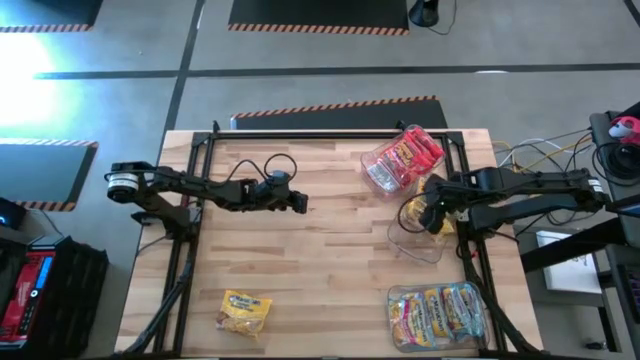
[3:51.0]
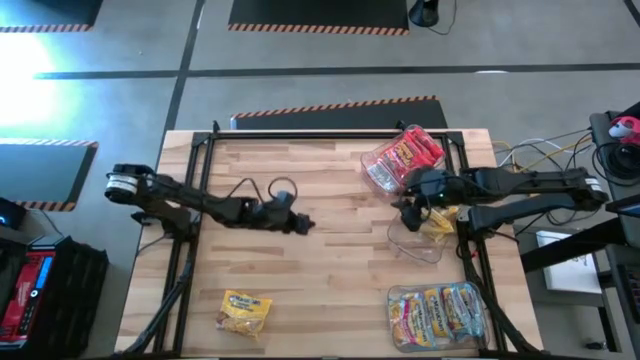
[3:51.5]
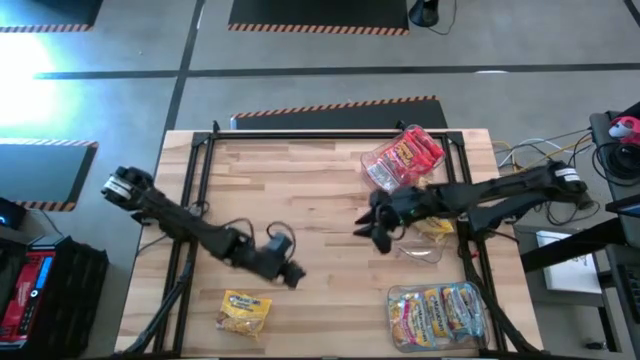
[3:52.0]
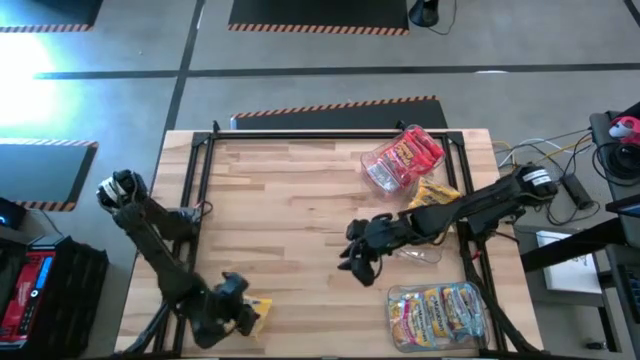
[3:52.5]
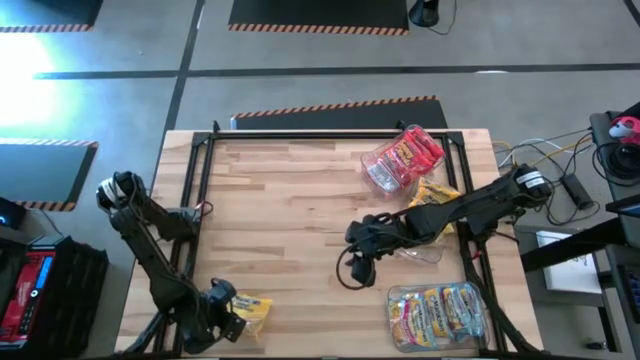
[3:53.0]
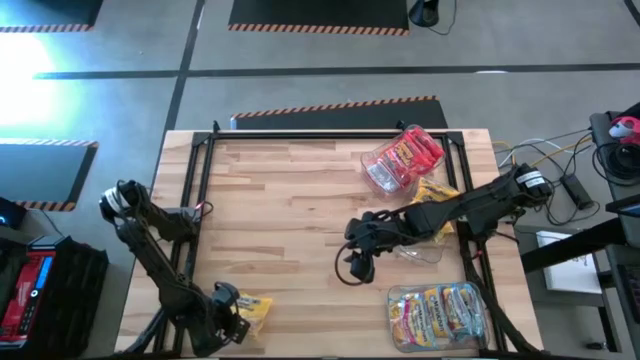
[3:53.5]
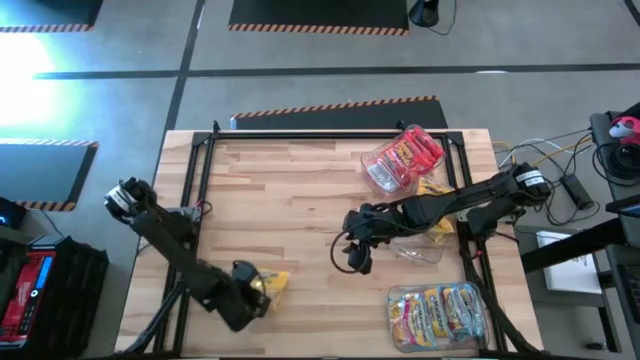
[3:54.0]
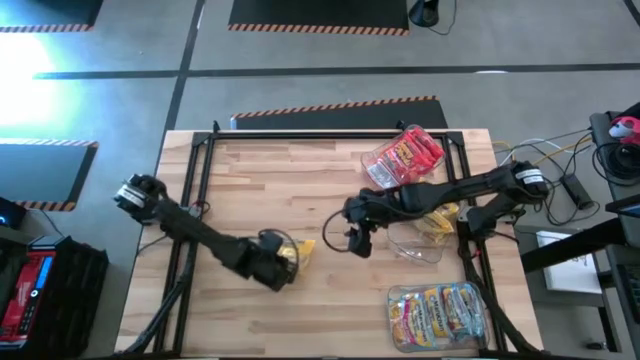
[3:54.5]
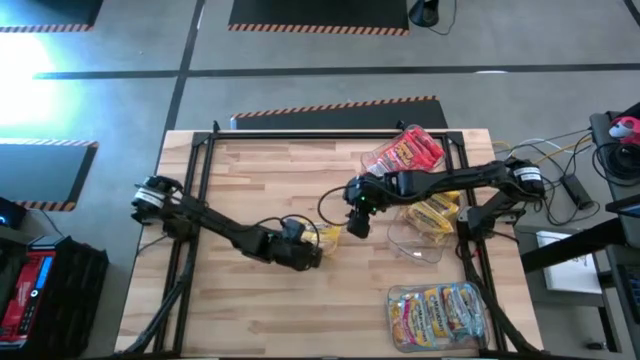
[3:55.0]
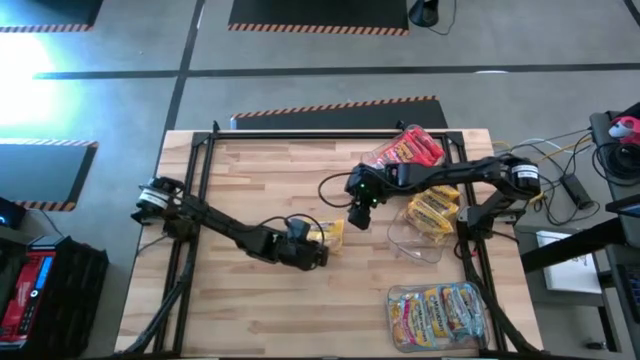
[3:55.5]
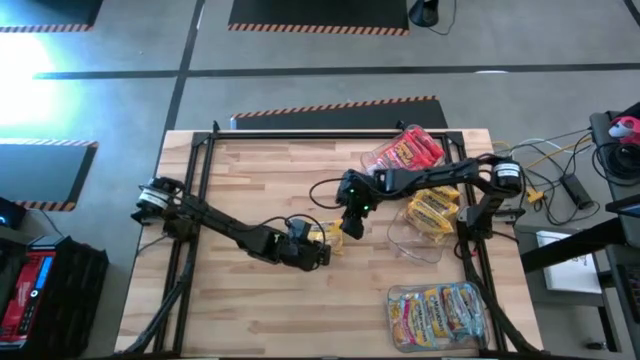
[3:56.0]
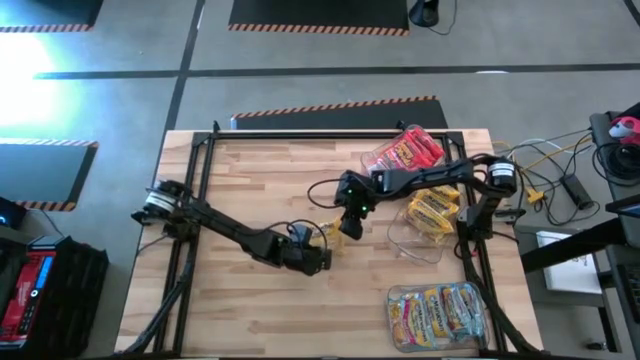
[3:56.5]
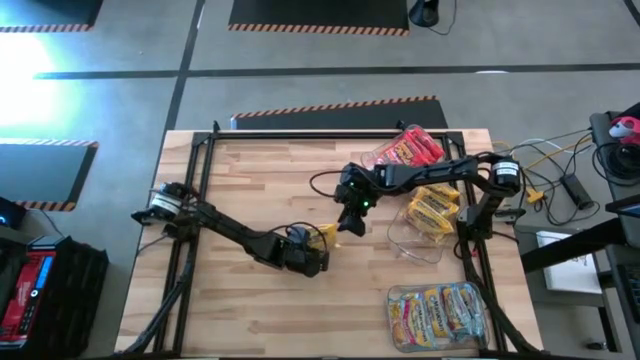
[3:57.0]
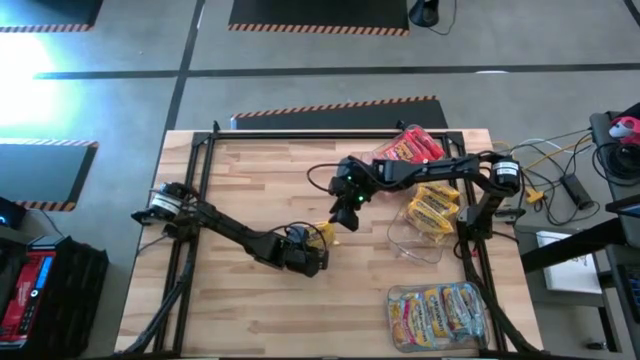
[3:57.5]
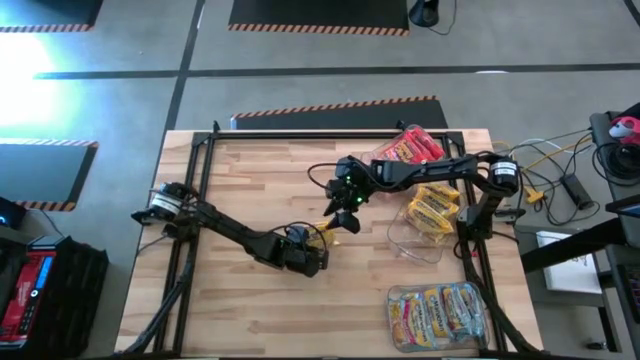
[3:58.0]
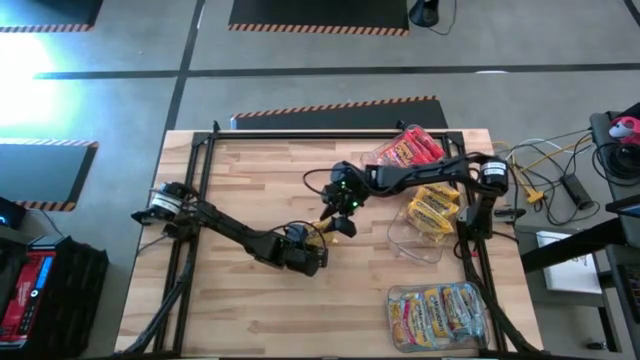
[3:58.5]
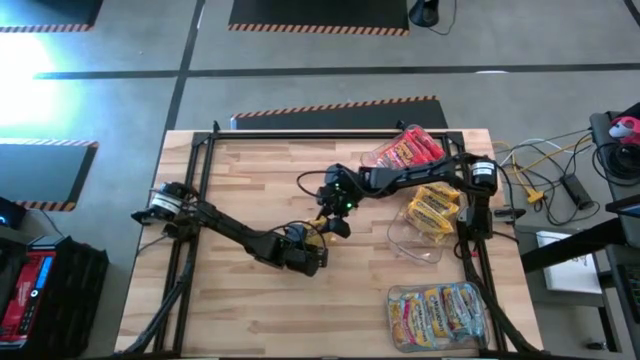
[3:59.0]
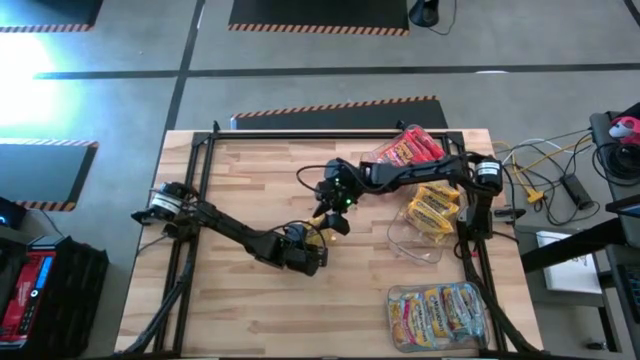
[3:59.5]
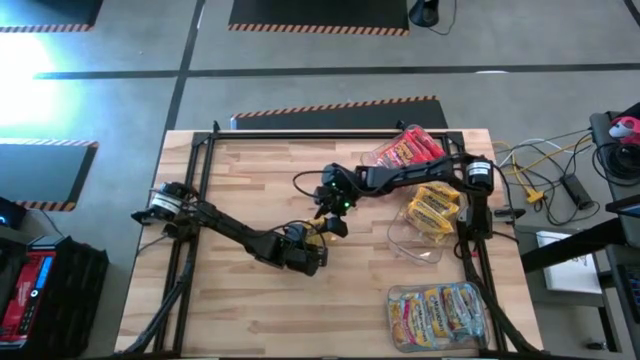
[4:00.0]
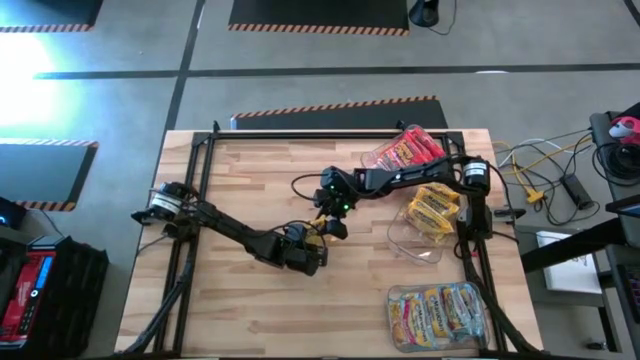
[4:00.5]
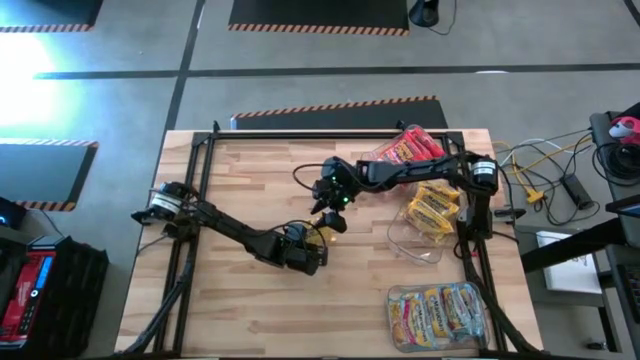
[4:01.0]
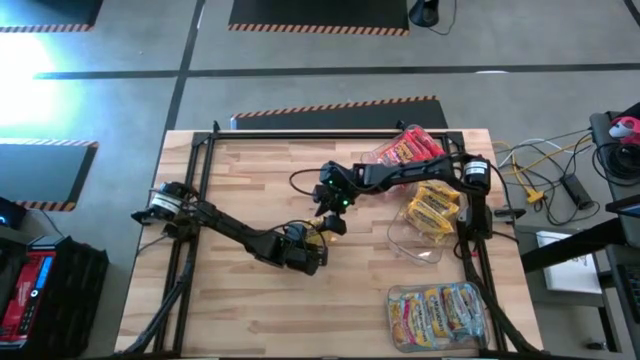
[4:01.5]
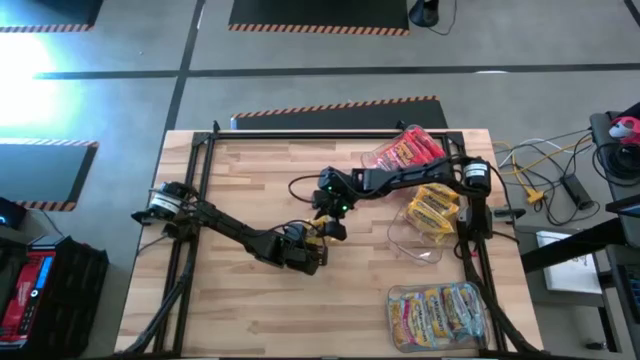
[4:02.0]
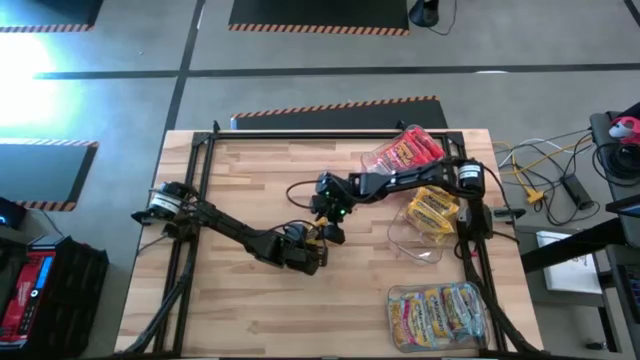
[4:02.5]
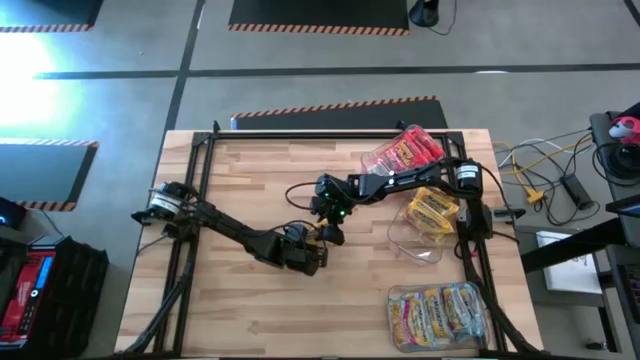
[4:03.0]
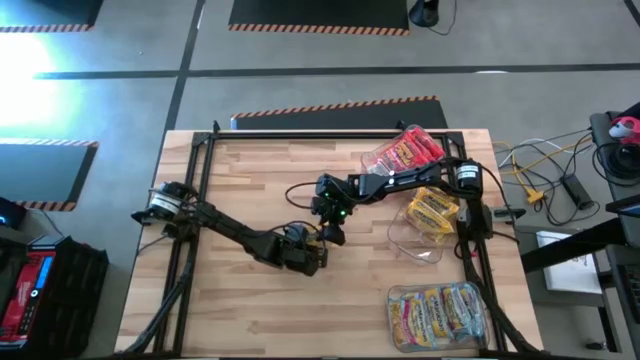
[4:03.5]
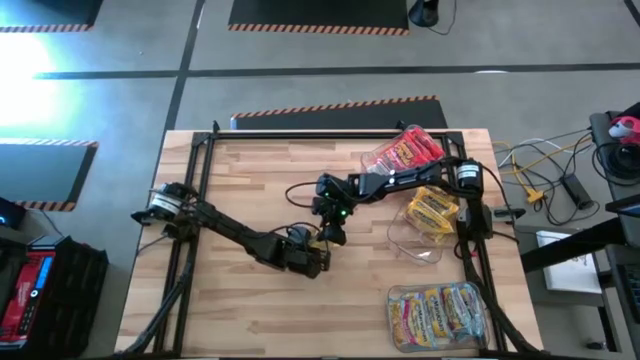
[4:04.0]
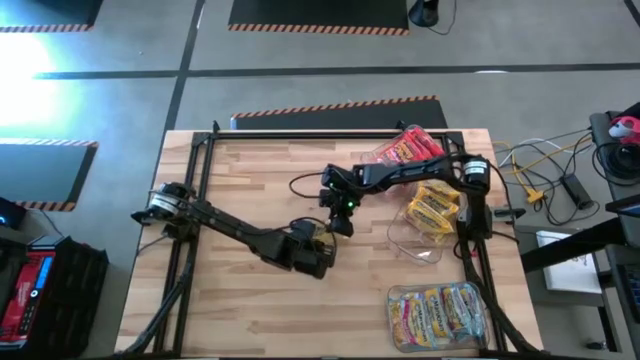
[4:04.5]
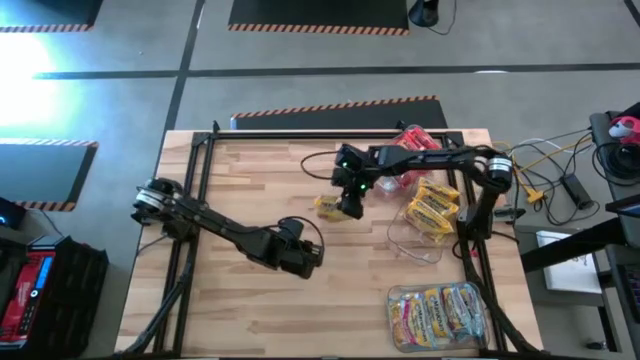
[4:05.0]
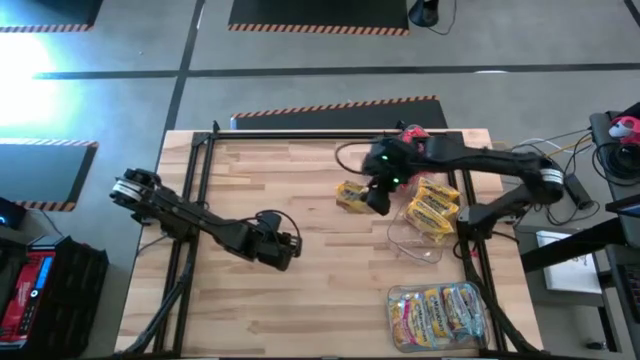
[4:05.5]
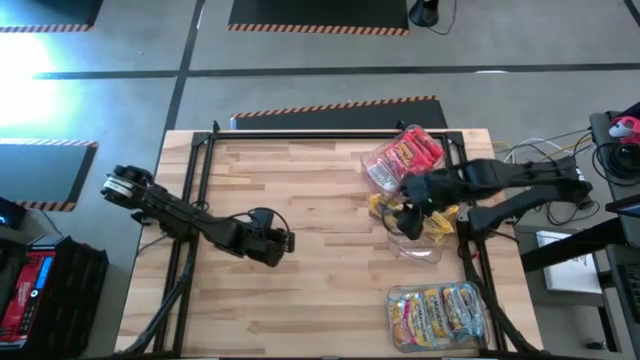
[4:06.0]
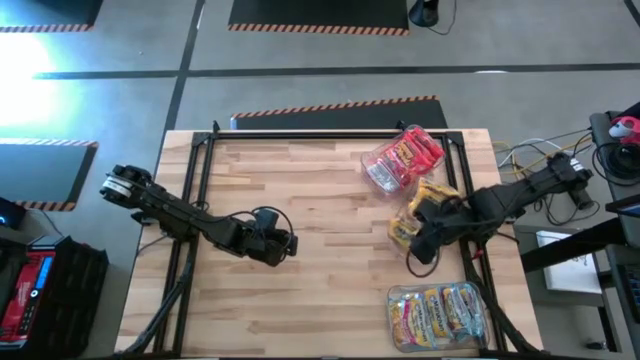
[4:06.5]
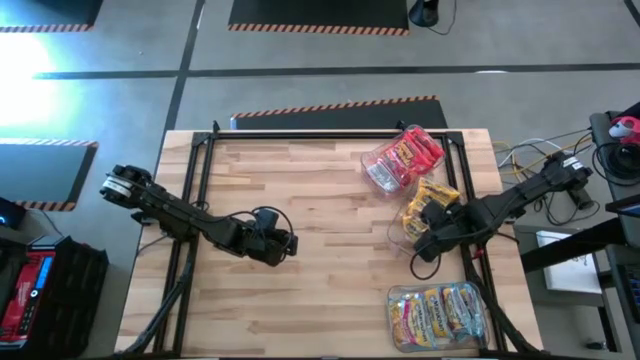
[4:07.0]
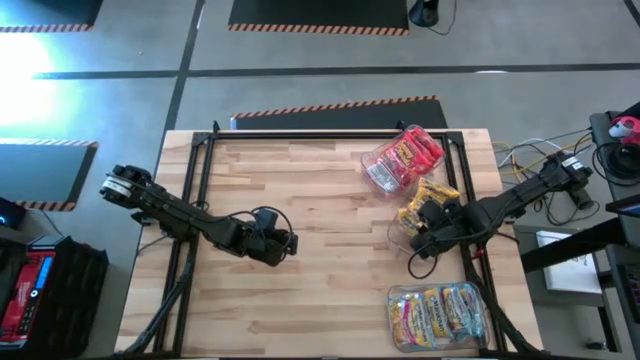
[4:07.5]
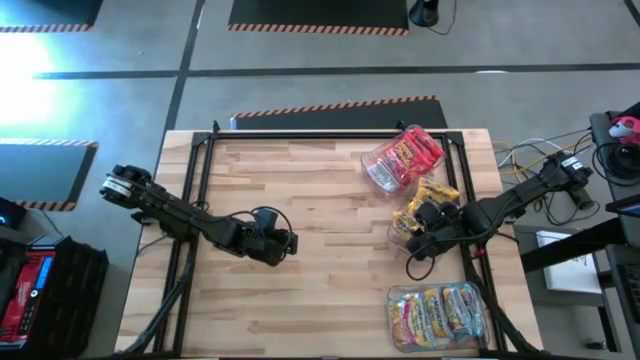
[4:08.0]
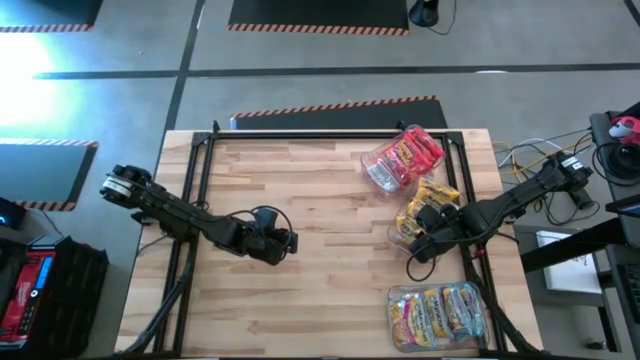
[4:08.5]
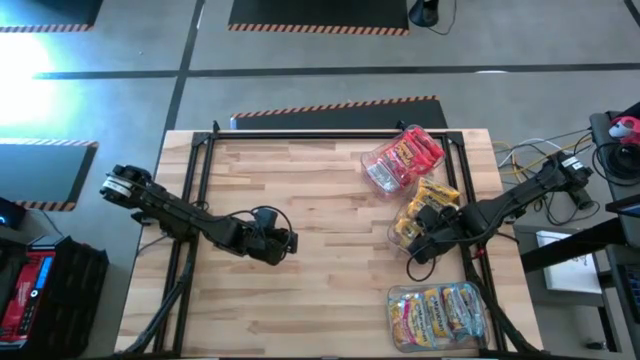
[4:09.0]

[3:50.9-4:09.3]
Task: Sort Maruchan noodles
Put the yellow noodle pack into the middle transparent bin

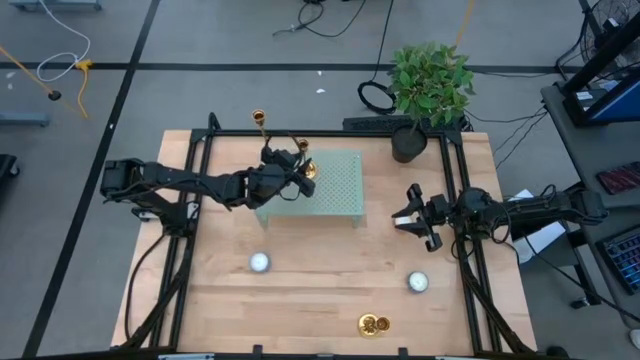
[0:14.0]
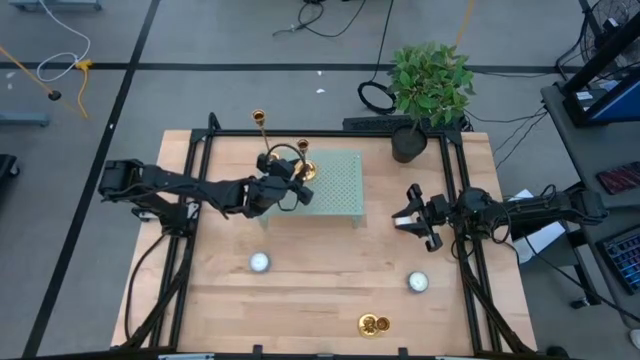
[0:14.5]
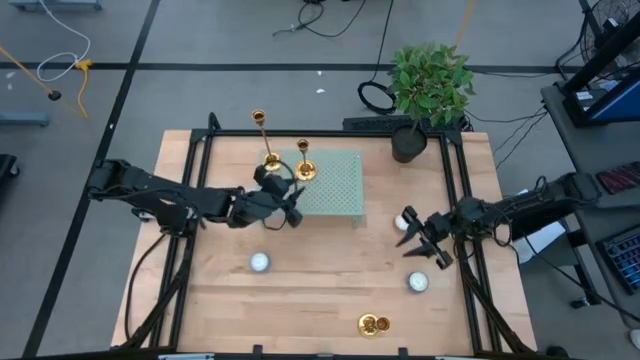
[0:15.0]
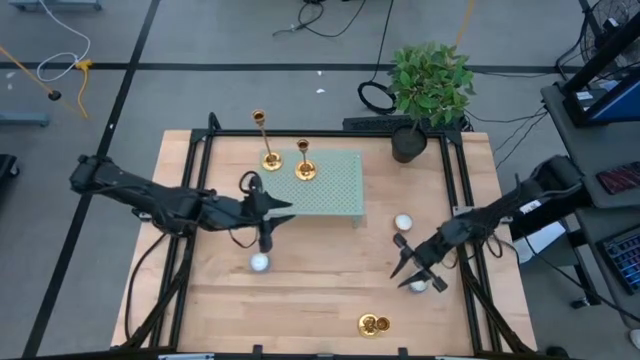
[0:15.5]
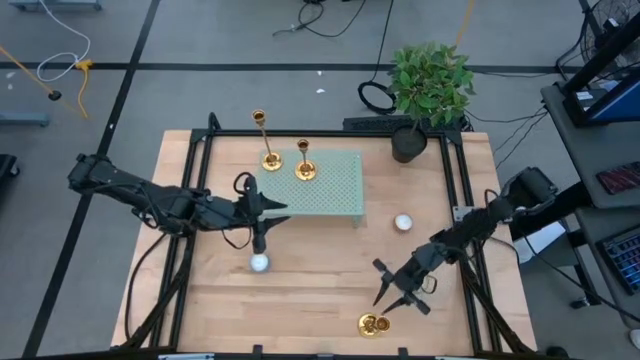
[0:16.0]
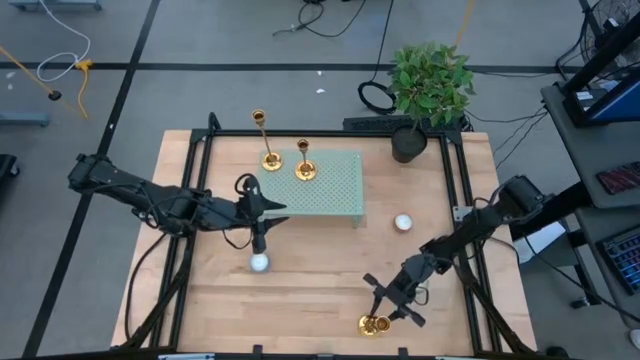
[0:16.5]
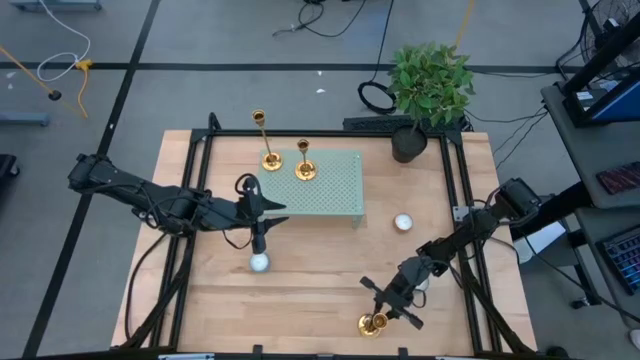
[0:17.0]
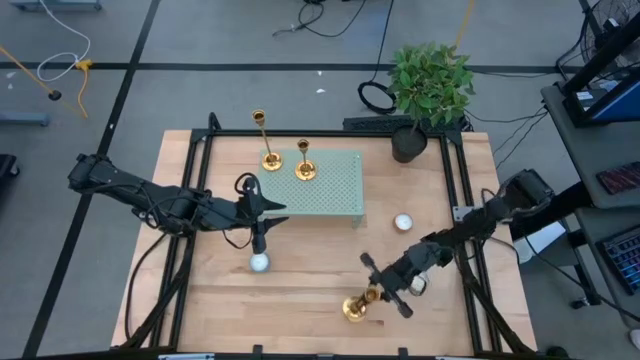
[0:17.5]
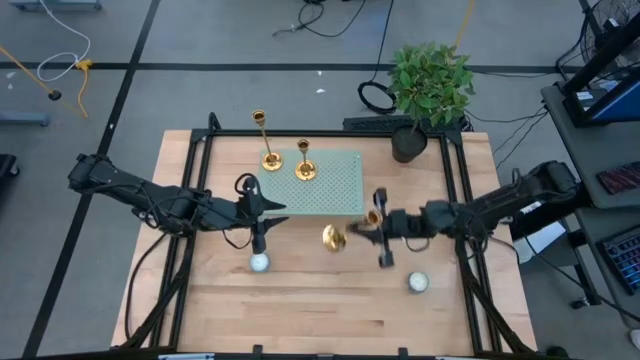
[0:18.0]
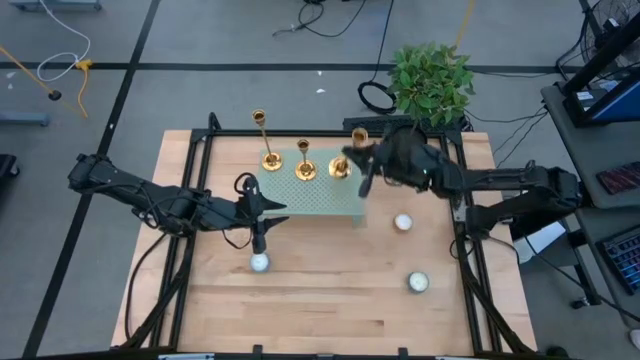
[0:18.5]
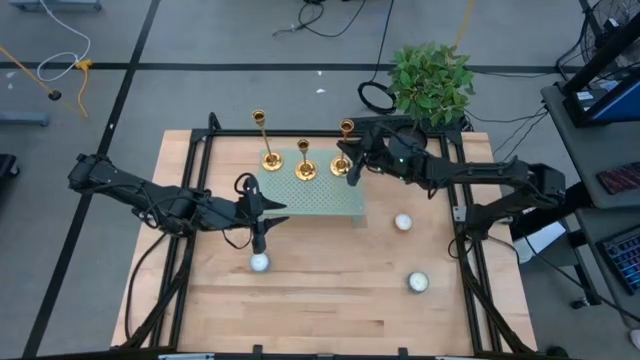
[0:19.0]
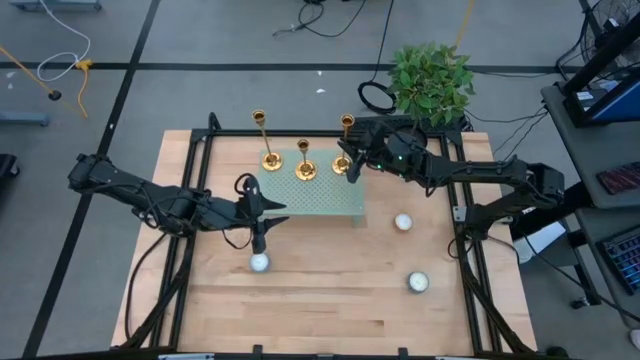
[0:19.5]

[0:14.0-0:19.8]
Task: Pick & Place candle stick holders
Put the gold candle holder on top of the shelf
